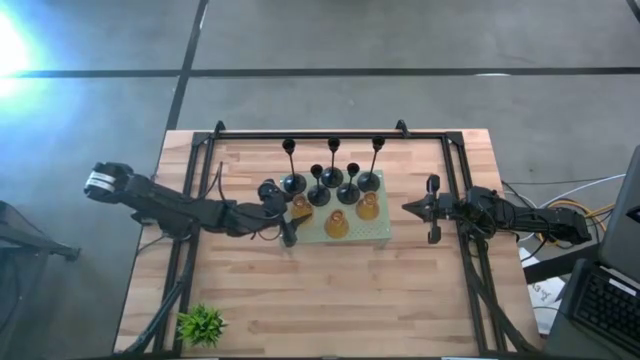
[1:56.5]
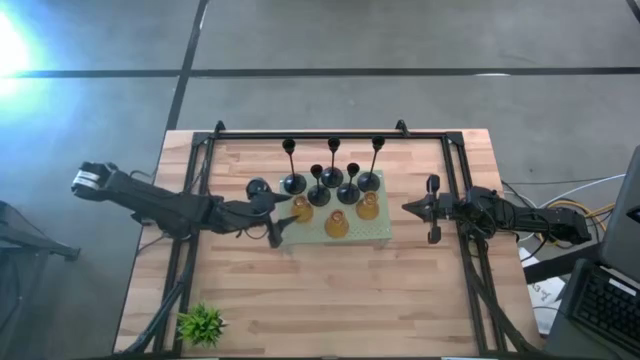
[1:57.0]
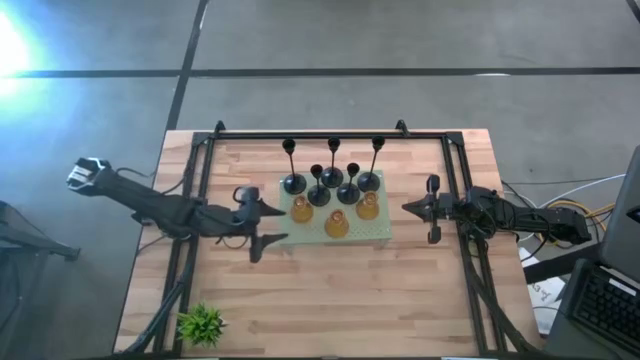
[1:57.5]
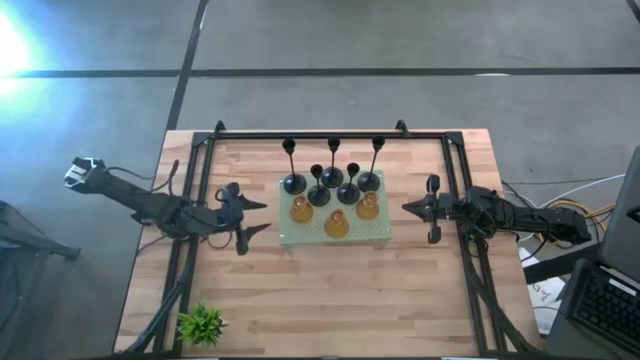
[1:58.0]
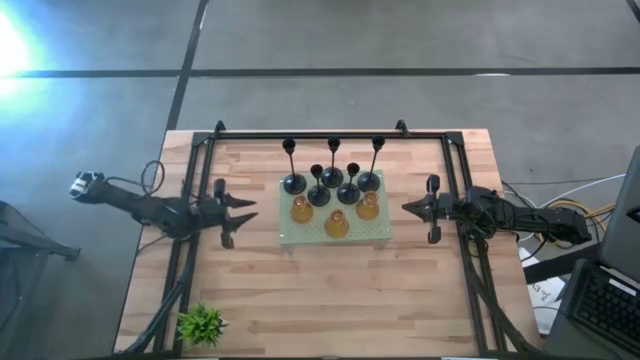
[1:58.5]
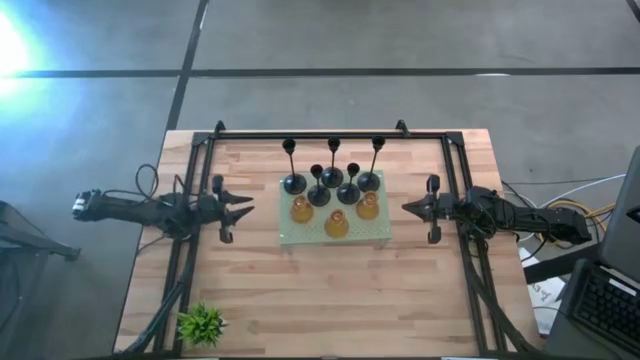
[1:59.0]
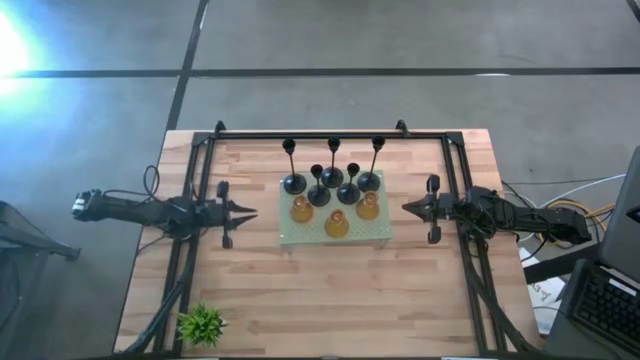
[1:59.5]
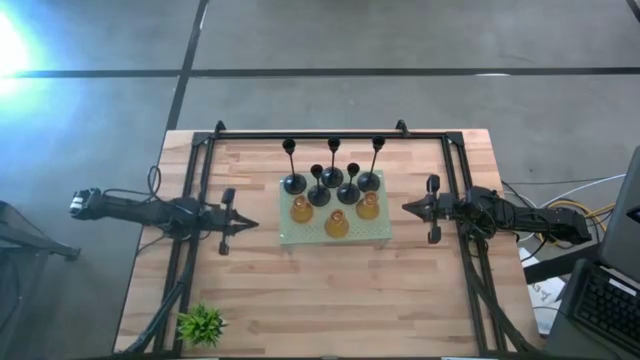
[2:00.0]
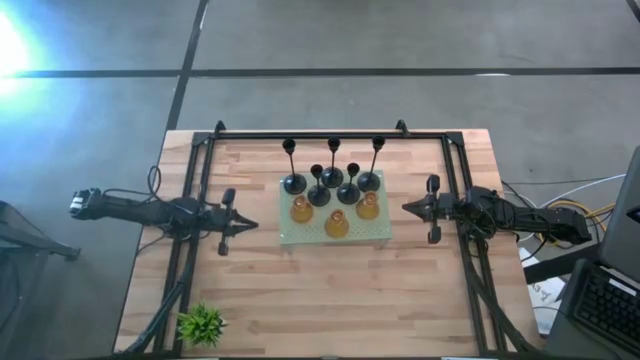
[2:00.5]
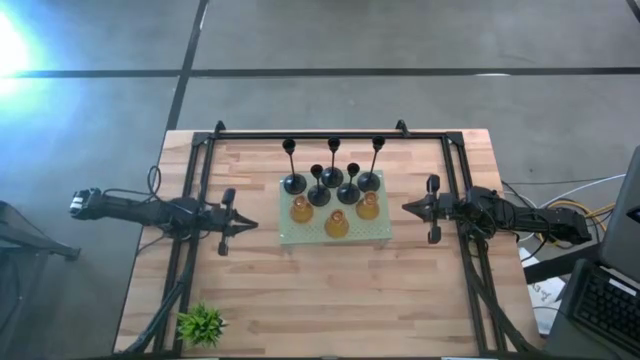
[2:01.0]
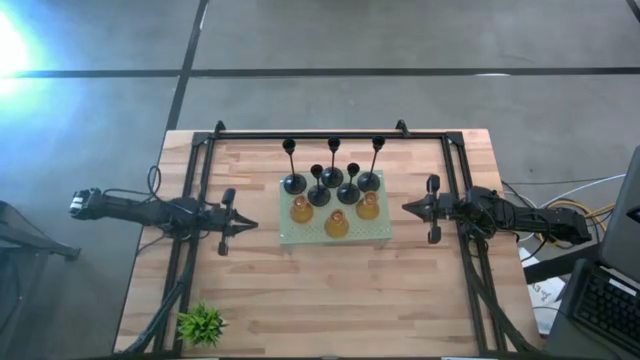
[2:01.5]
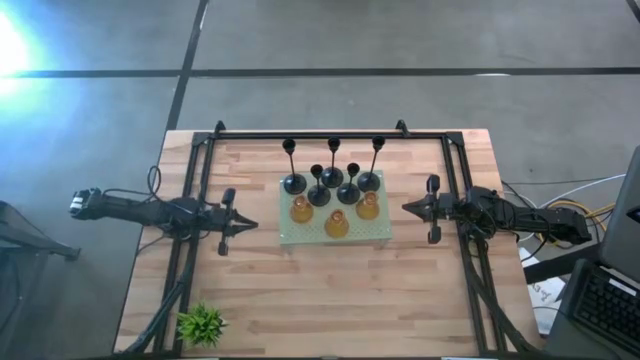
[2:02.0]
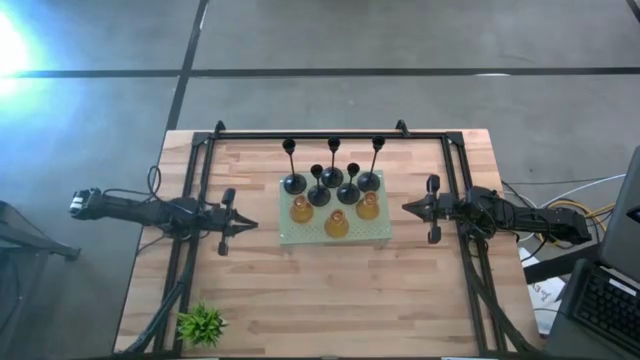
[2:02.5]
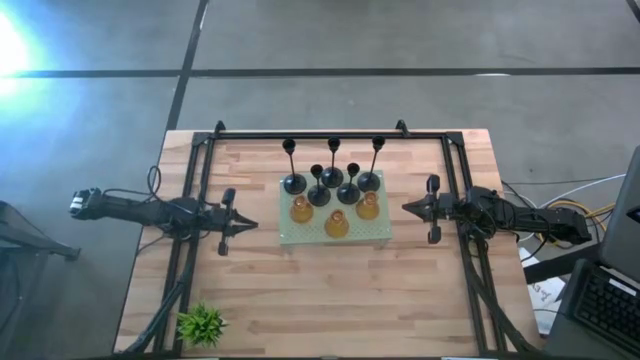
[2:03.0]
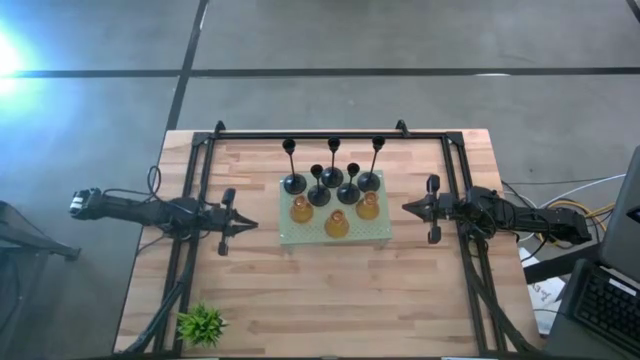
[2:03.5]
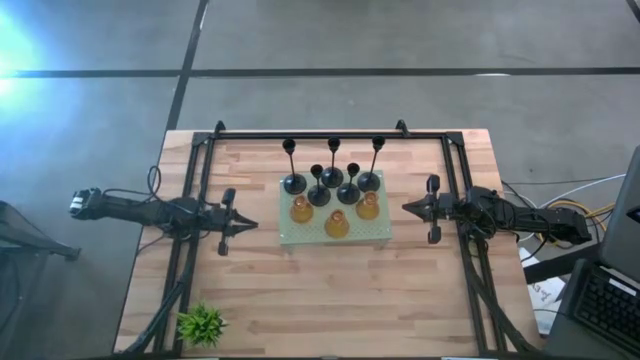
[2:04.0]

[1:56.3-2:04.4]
Task: Pick & Place candle stick holders
Return to Home Position

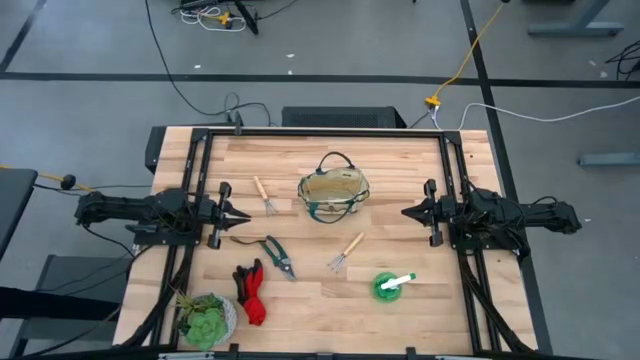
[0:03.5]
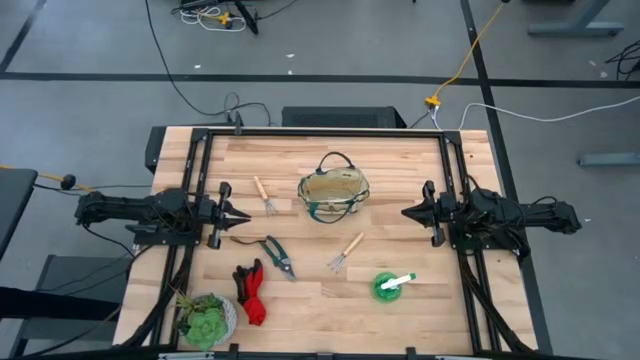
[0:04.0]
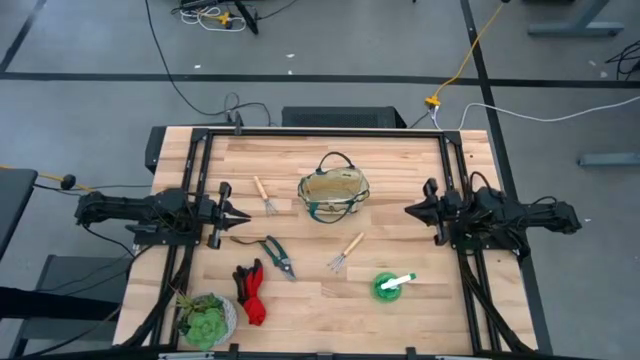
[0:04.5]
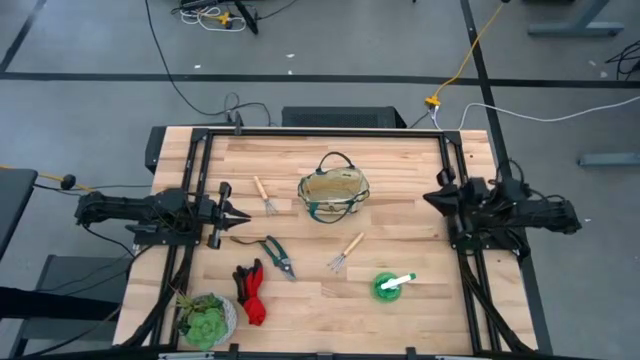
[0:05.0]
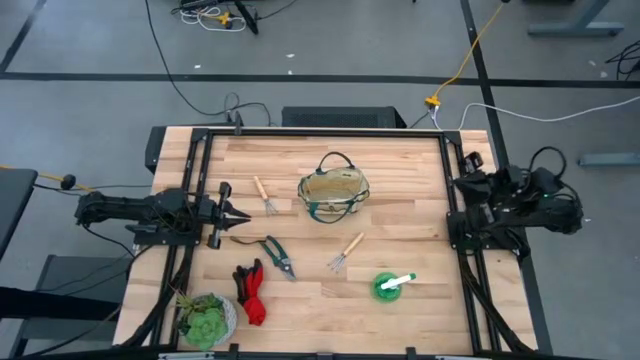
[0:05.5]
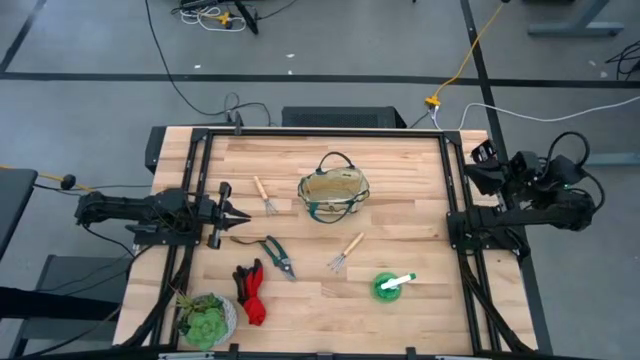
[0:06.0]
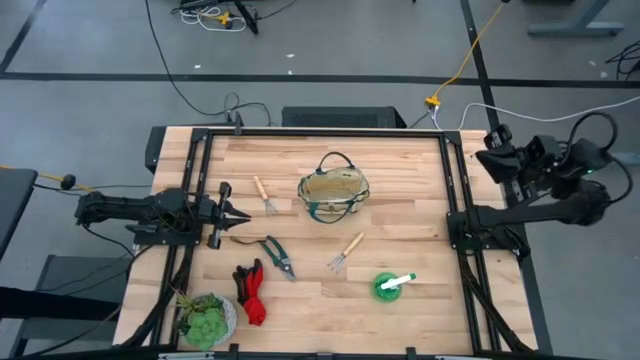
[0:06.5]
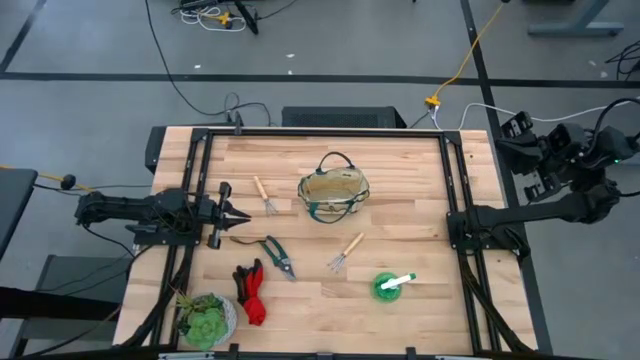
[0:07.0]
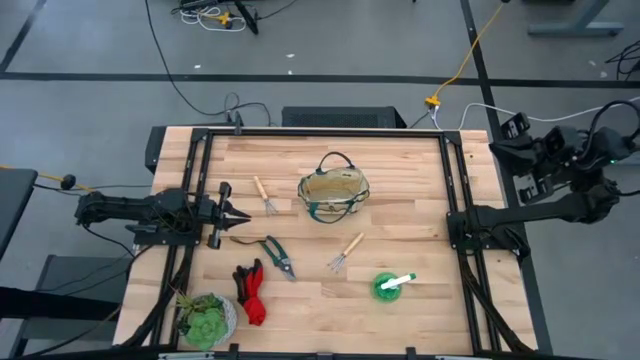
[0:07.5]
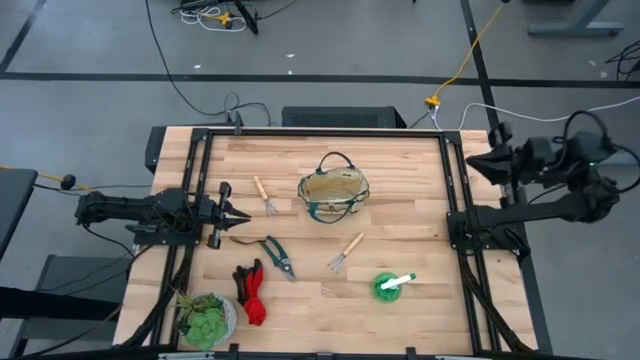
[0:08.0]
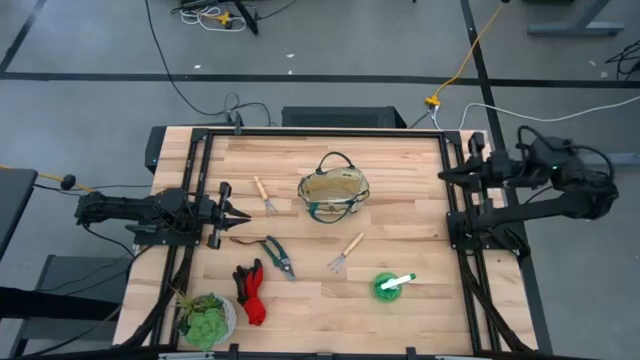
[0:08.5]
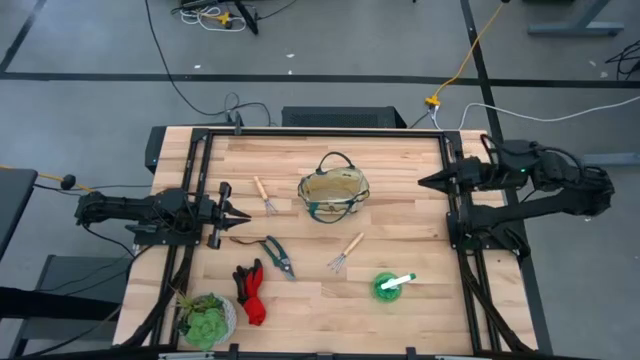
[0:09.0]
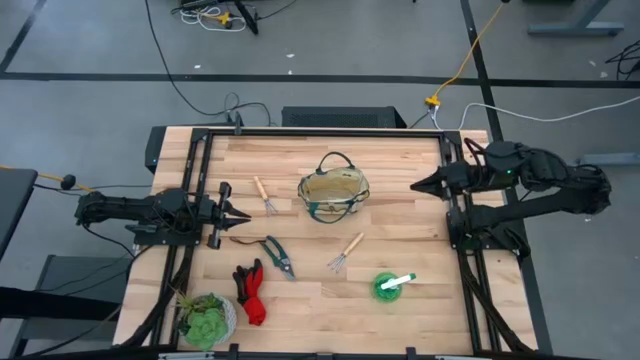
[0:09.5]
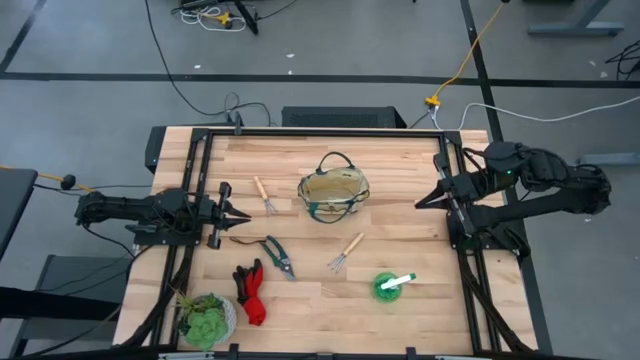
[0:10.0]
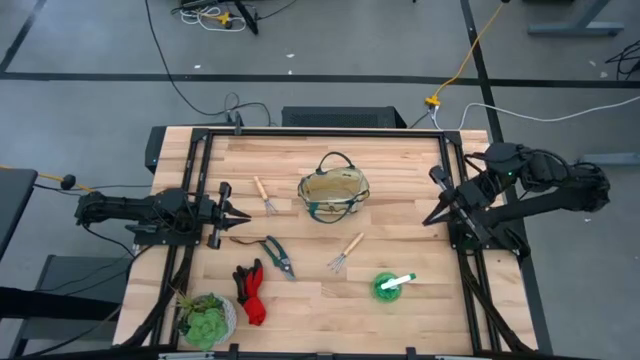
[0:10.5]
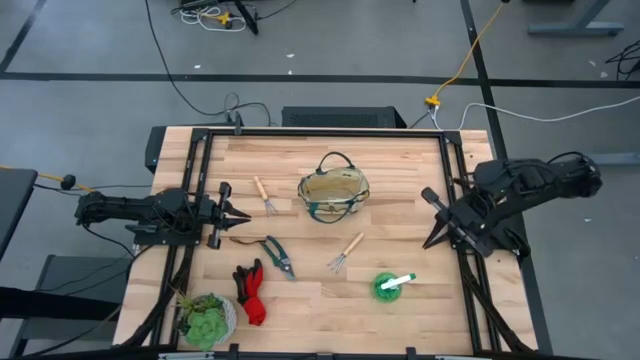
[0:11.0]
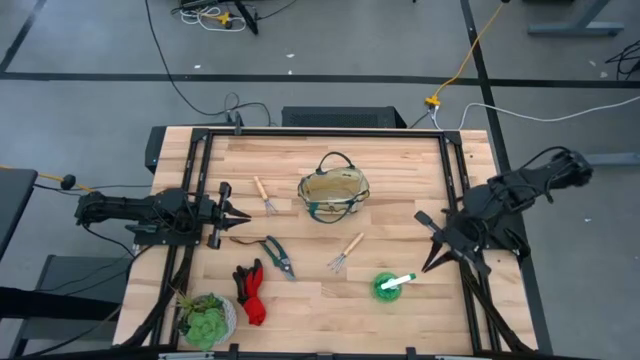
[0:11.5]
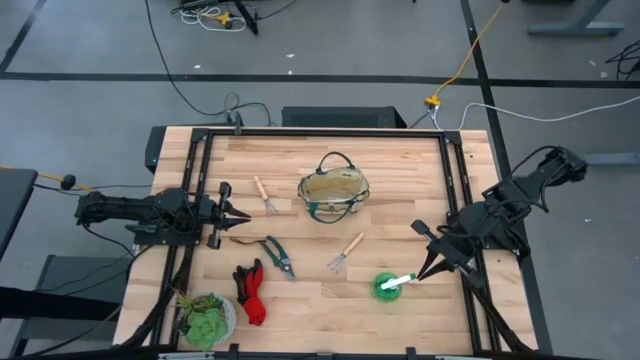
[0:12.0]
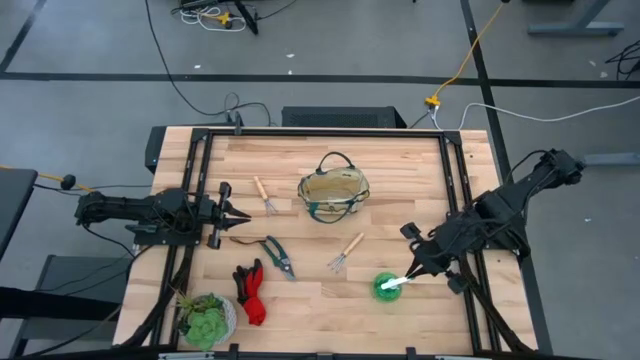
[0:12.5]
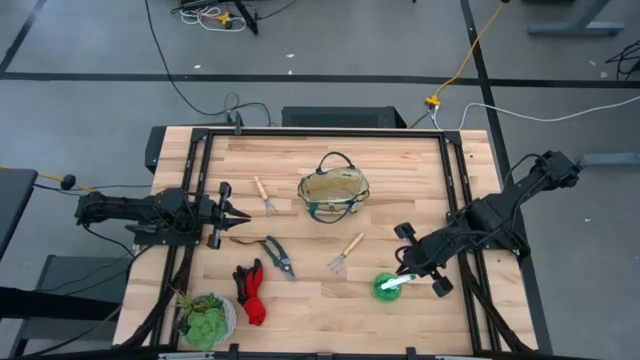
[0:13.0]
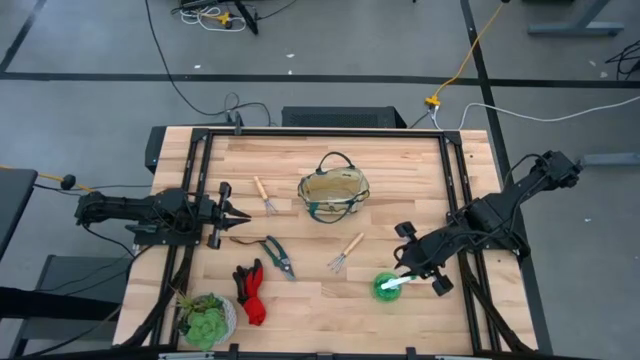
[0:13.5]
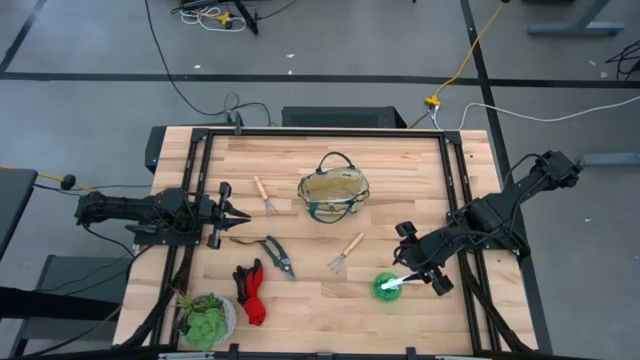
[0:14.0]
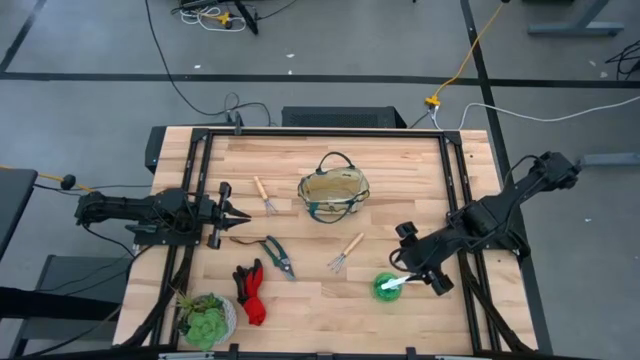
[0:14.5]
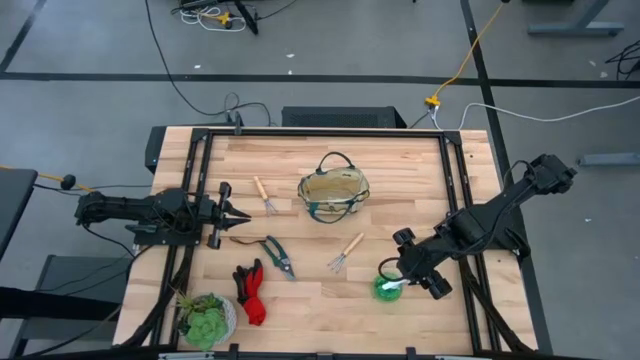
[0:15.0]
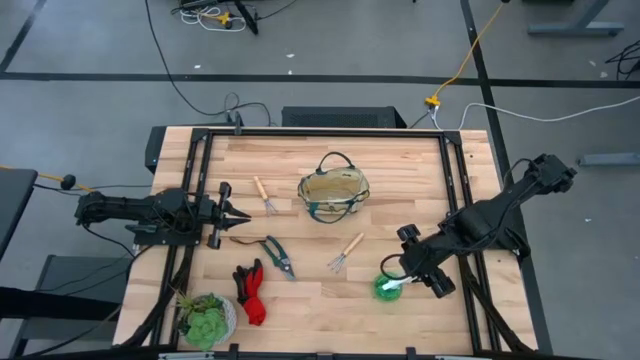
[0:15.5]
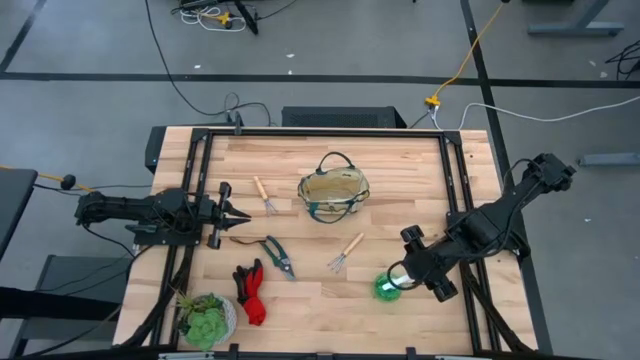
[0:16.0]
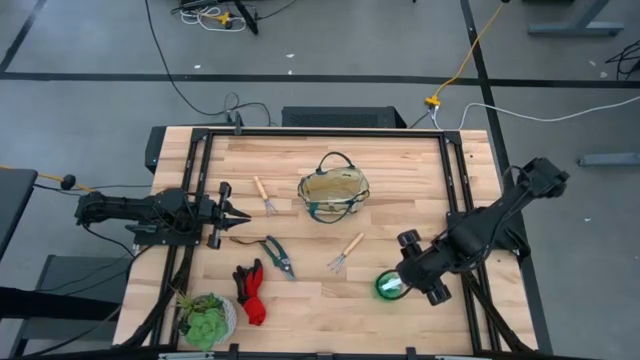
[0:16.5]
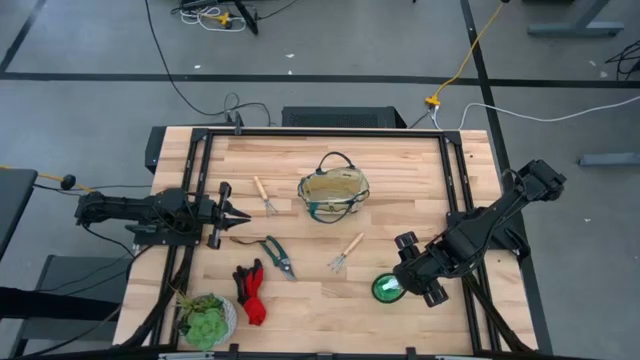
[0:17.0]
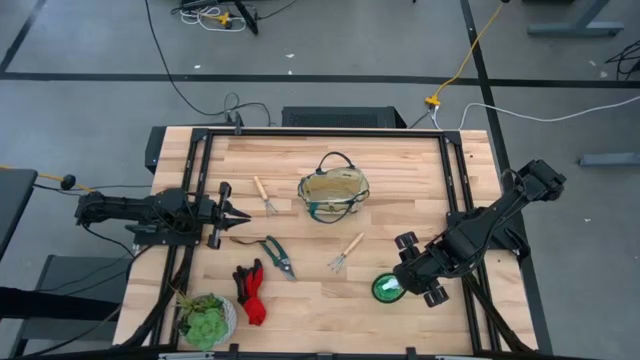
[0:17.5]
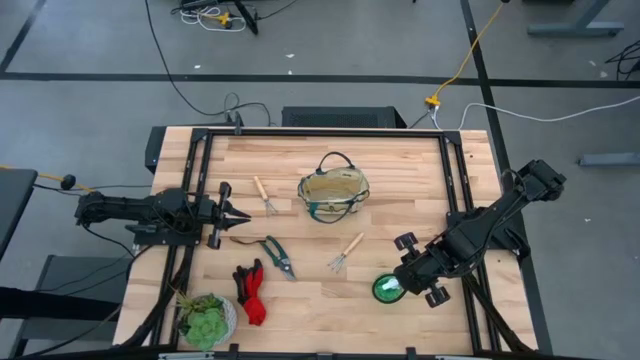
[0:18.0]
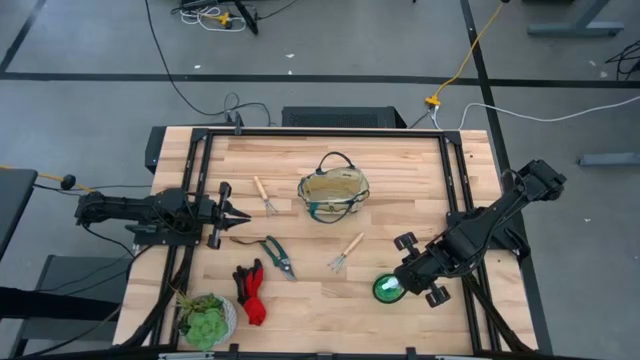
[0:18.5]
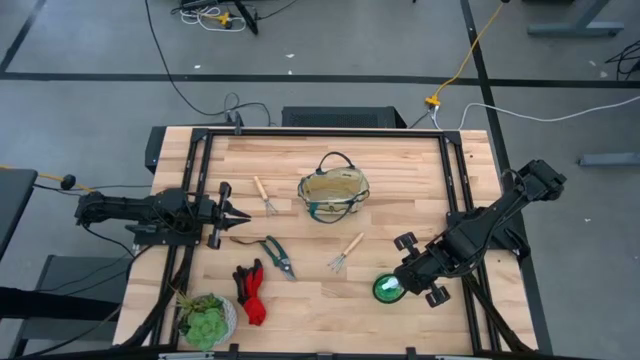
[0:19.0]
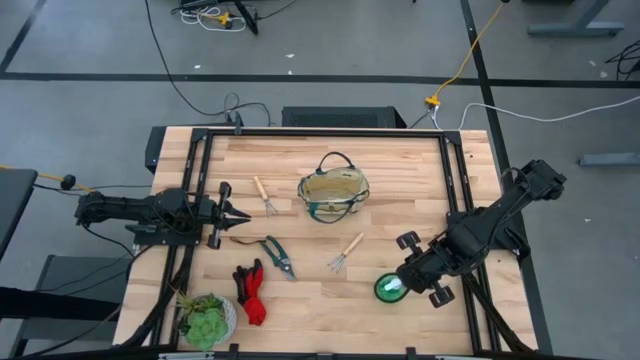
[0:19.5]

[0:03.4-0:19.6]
Task: Pick & Place Garden tools in Gardening bag
Put the green spray bottle into the gardening bag
